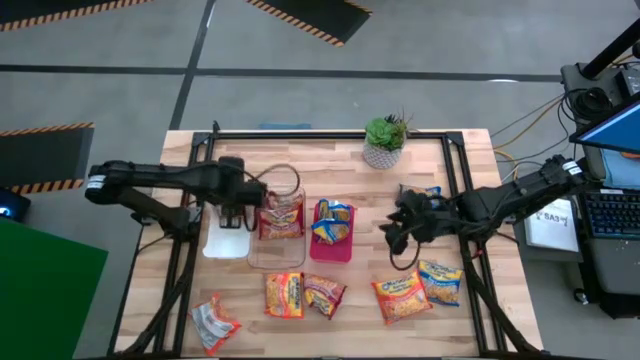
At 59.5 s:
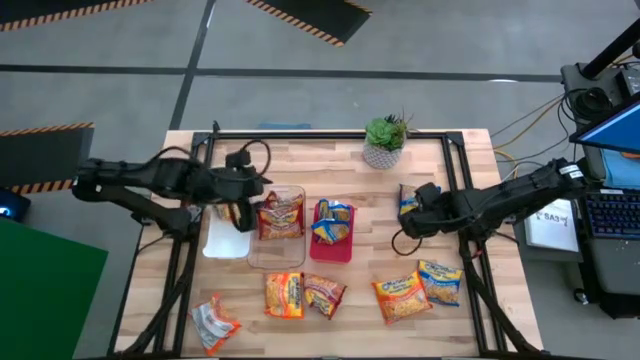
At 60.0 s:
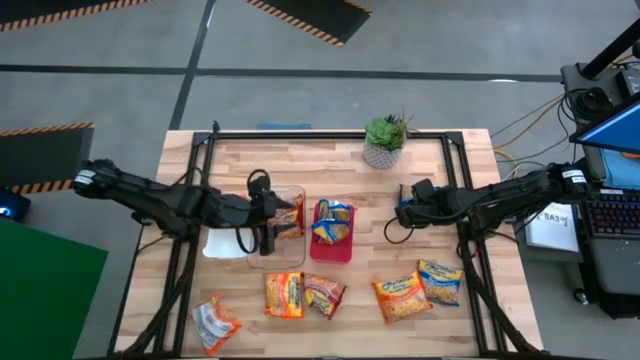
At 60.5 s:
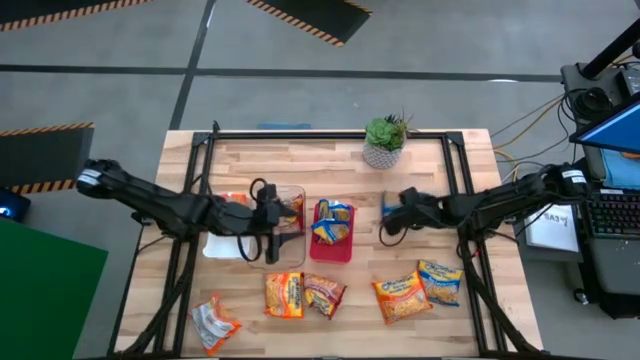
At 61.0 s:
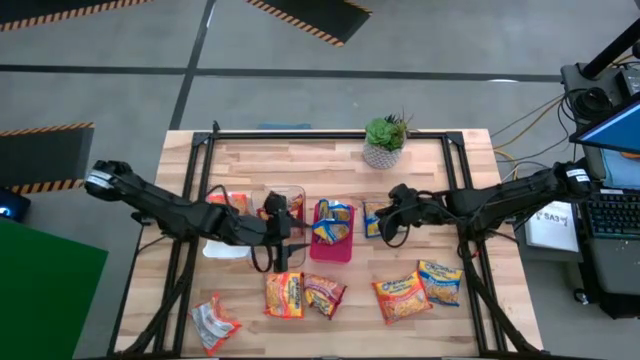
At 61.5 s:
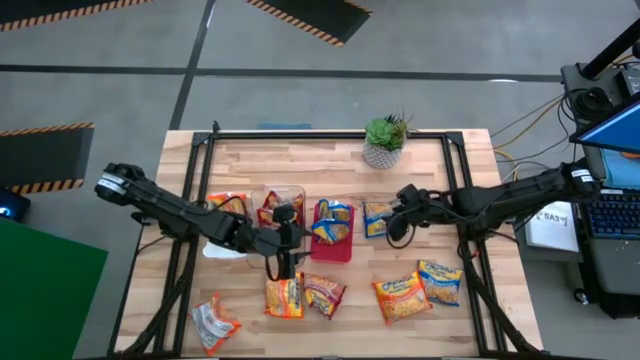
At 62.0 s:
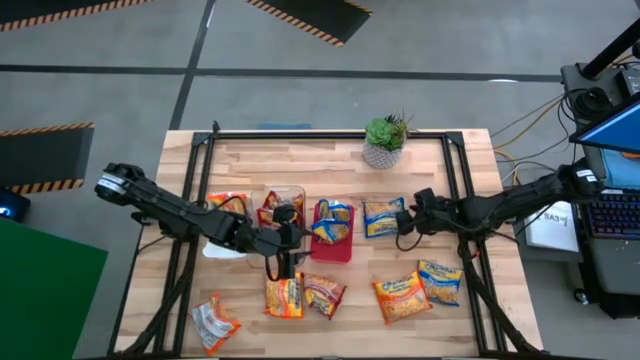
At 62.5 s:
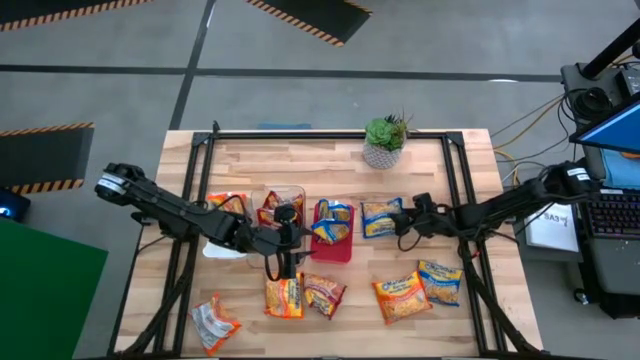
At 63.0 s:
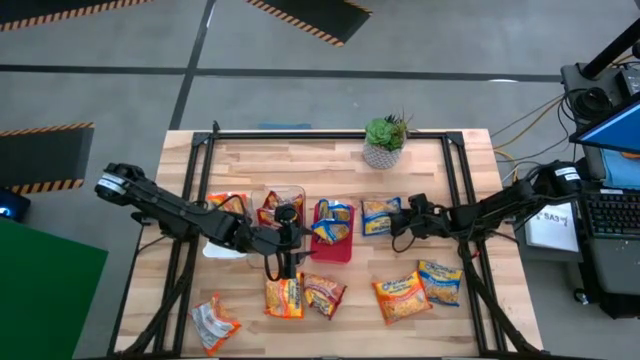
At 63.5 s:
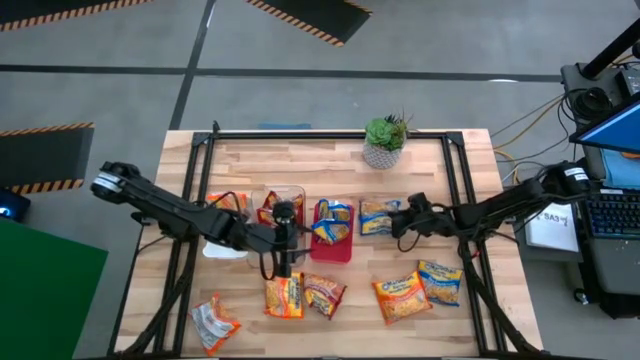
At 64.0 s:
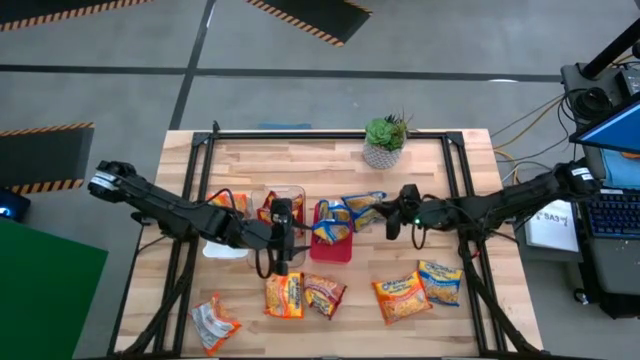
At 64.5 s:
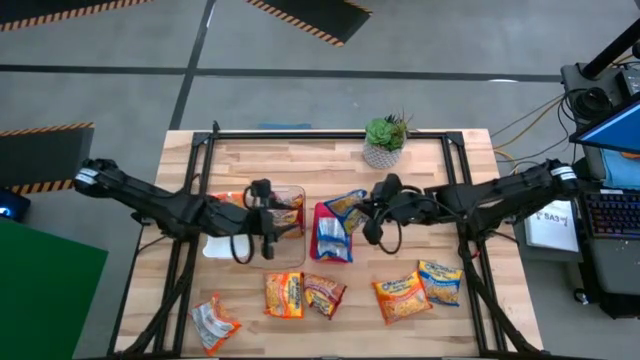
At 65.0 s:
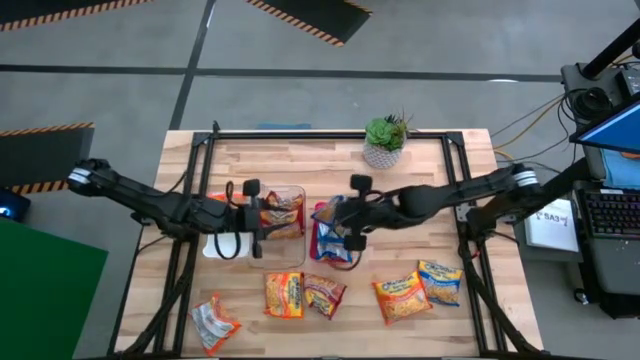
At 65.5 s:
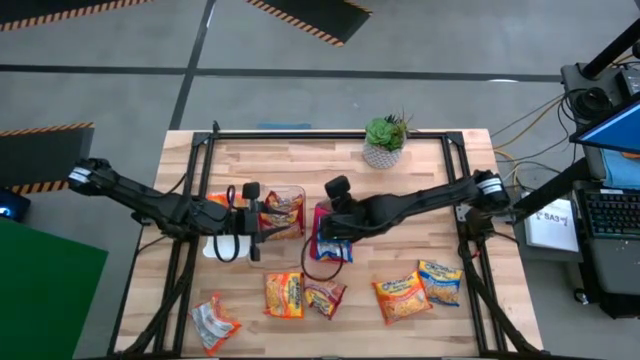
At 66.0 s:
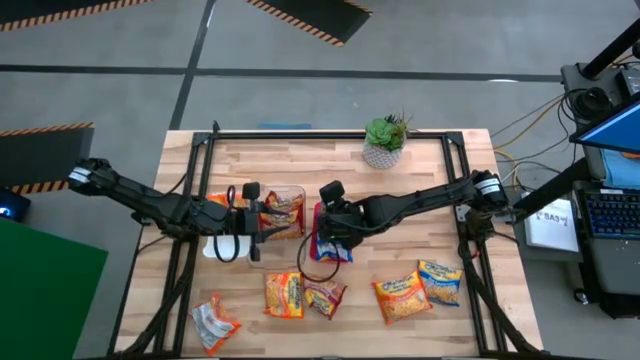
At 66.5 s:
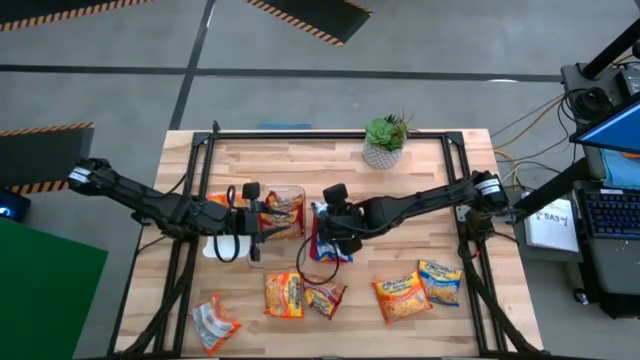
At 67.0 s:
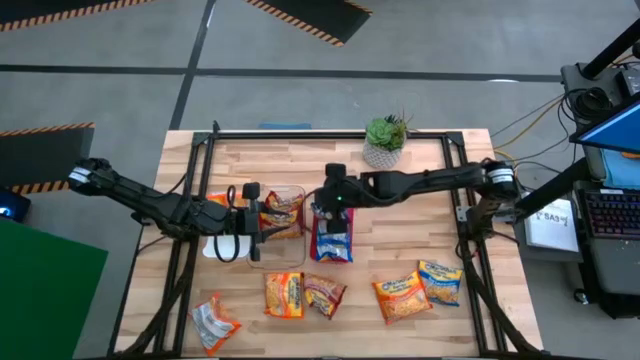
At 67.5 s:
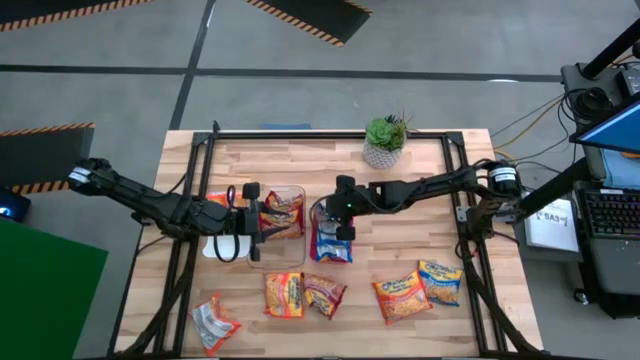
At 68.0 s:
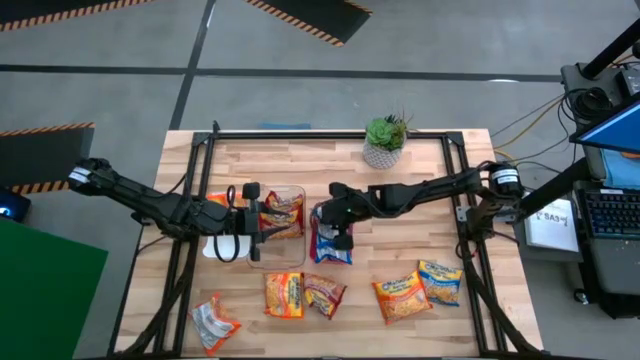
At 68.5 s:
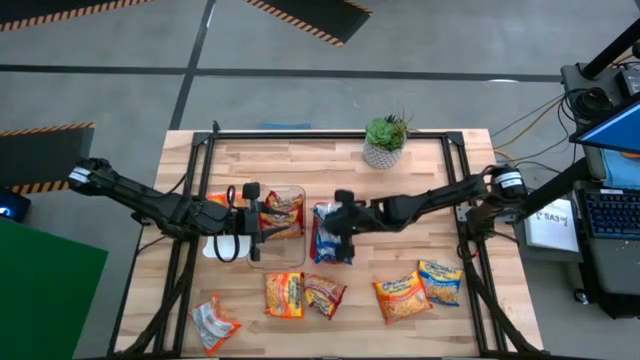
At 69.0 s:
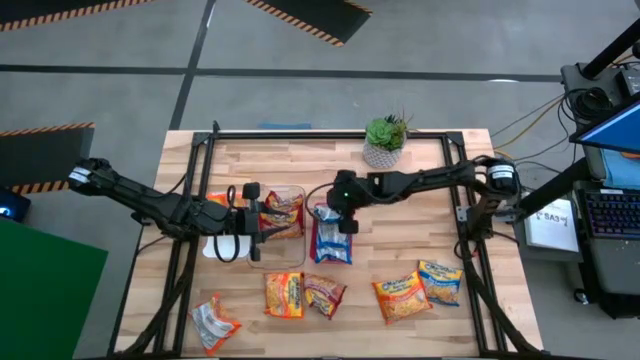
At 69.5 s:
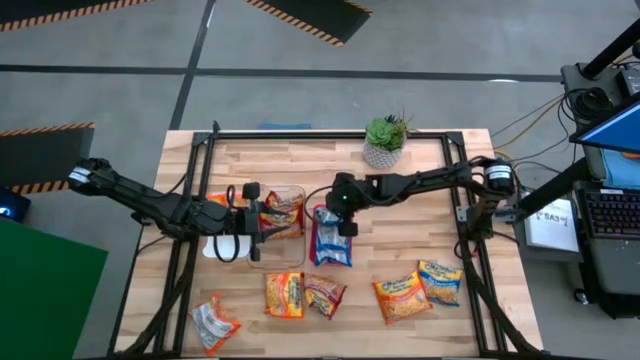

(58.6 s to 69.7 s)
Task: Sort Maruchan noodles
Put the blue noodle pack into the red bin

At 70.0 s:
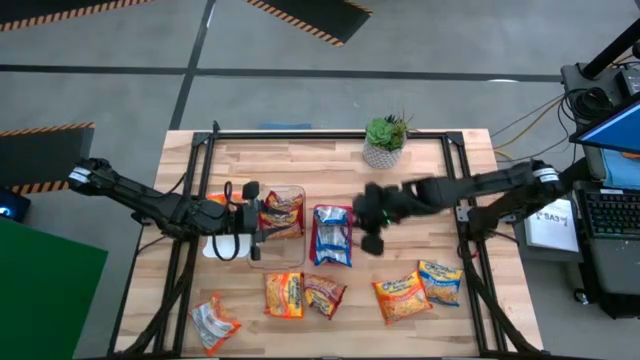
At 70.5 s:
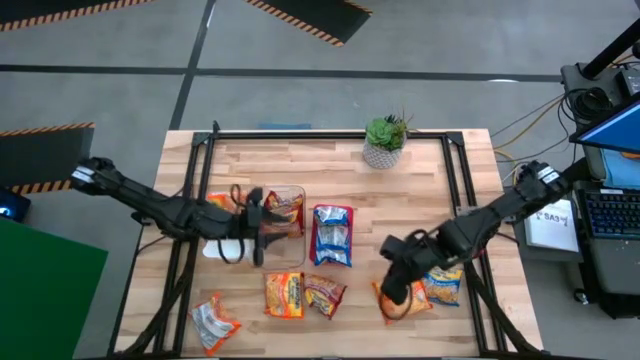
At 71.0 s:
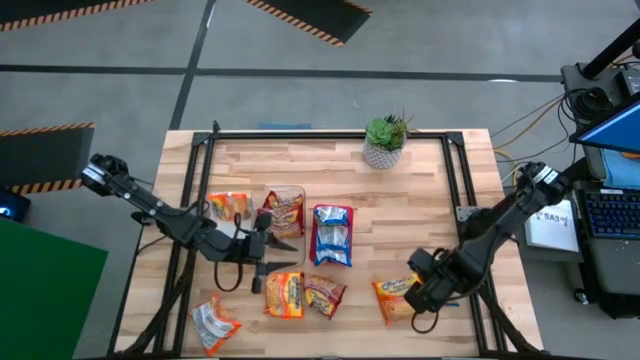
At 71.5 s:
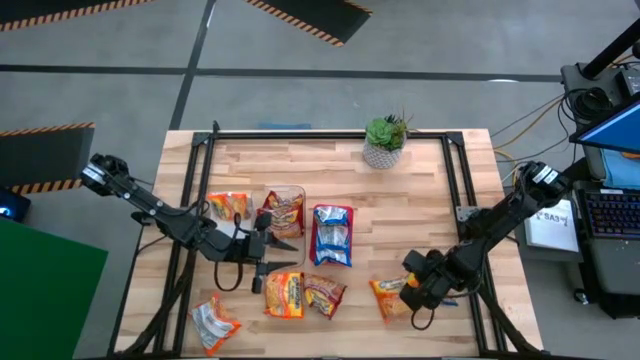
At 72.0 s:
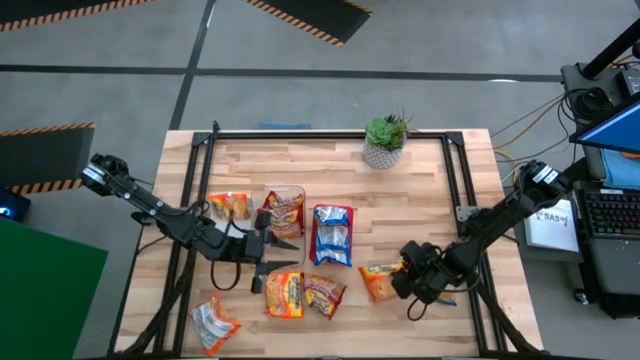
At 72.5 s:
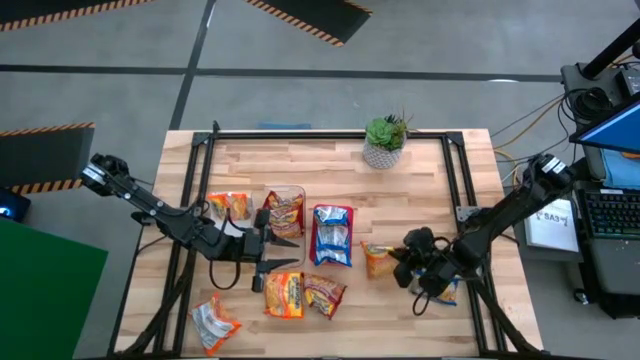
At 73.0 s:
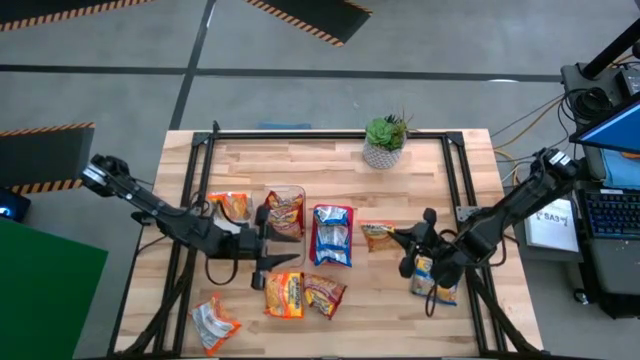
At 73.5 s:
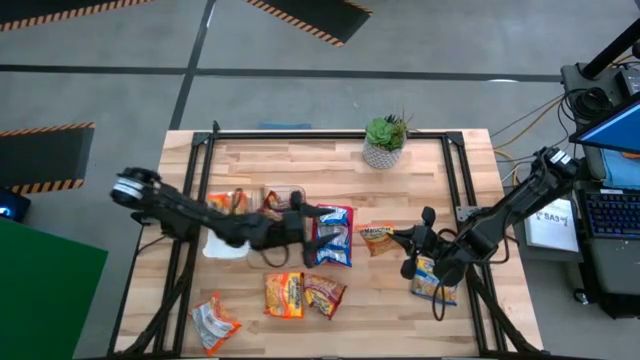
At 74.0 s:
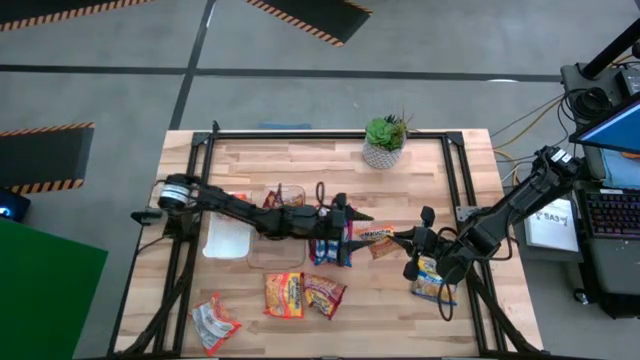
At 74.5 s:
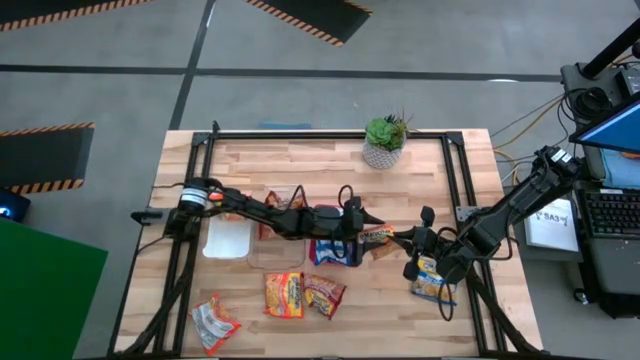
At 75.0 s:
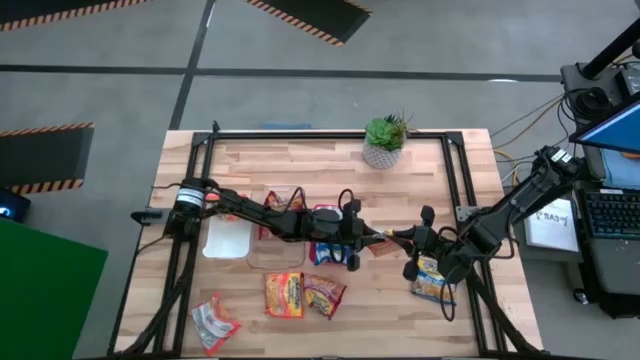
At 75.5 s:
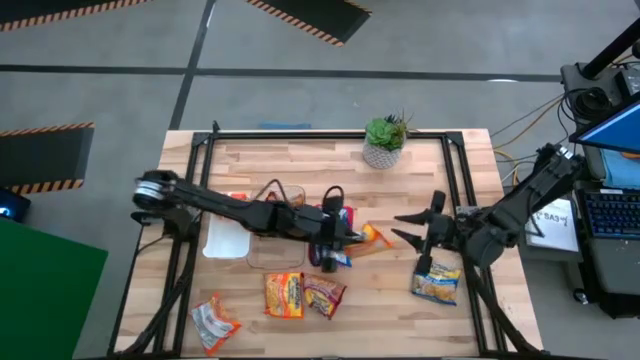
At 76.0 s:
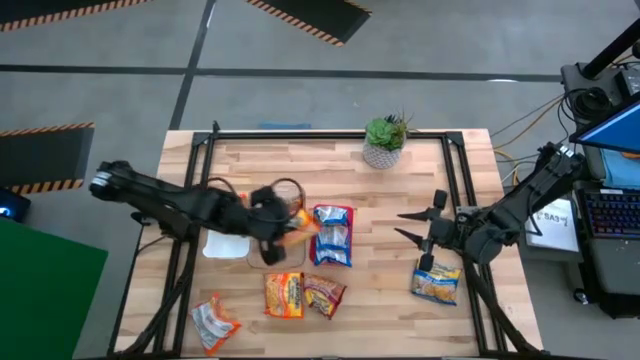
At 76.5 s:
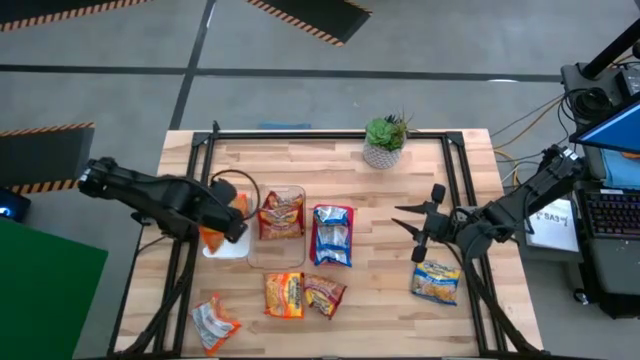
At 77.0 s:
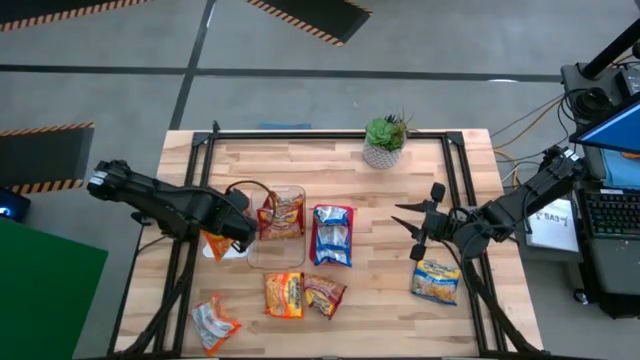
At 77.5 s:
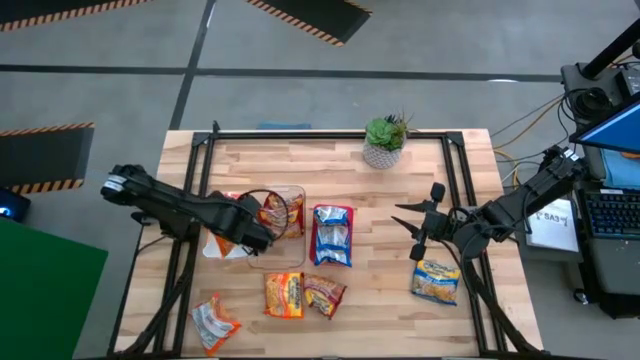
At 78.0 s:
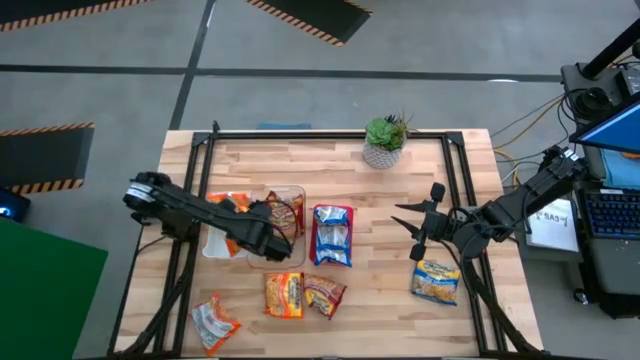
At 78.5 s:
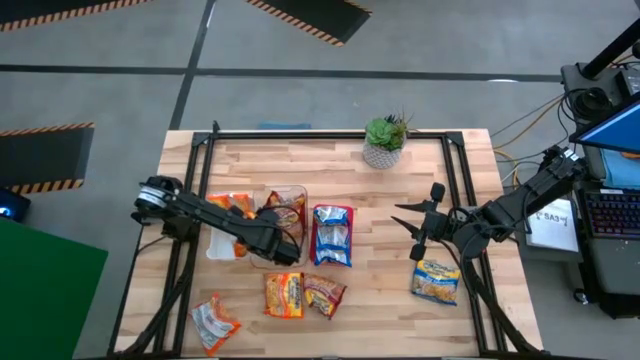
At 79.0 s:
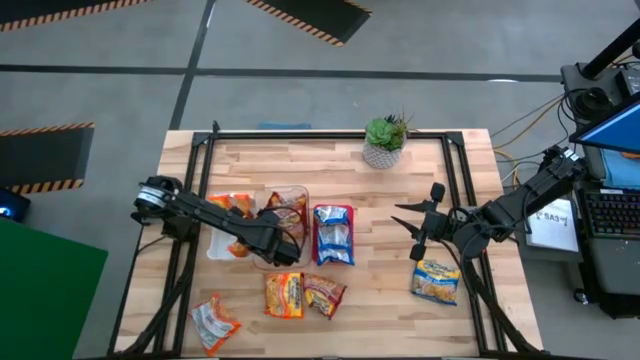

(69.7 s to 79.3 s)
Put the orange noodle pack into the white bin

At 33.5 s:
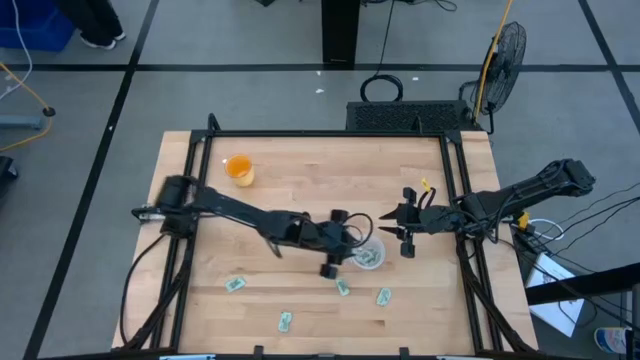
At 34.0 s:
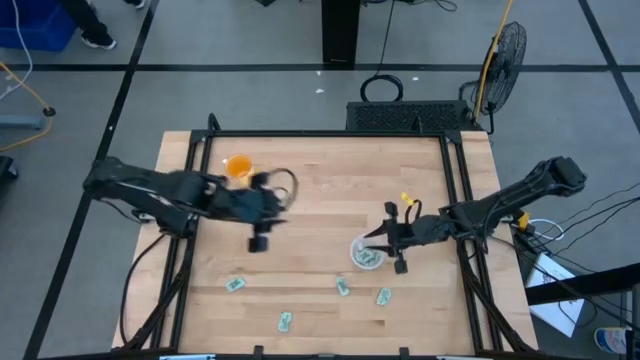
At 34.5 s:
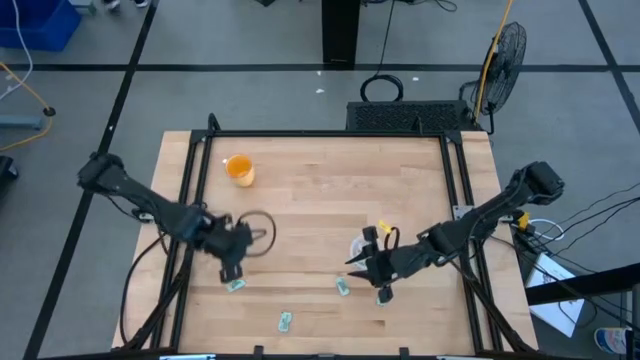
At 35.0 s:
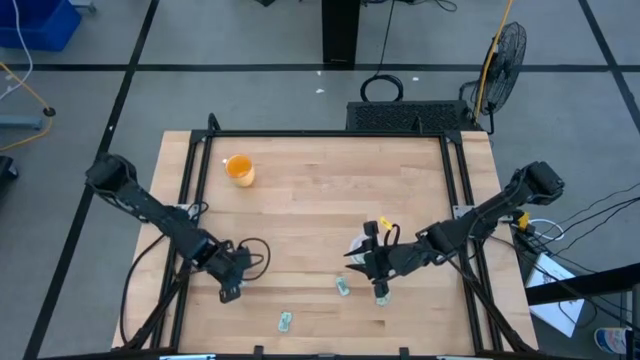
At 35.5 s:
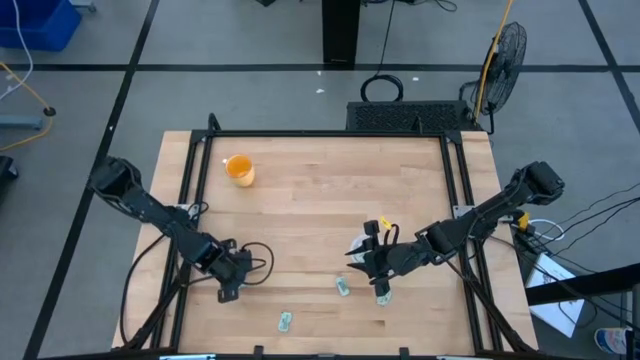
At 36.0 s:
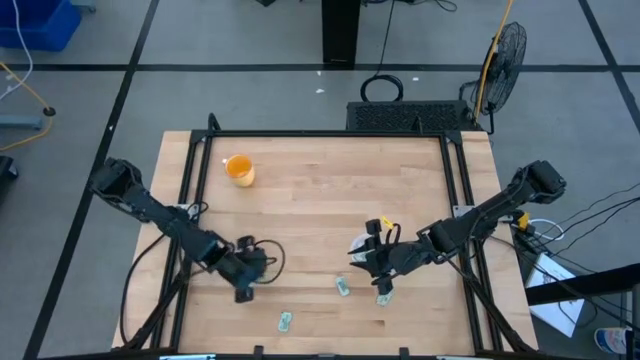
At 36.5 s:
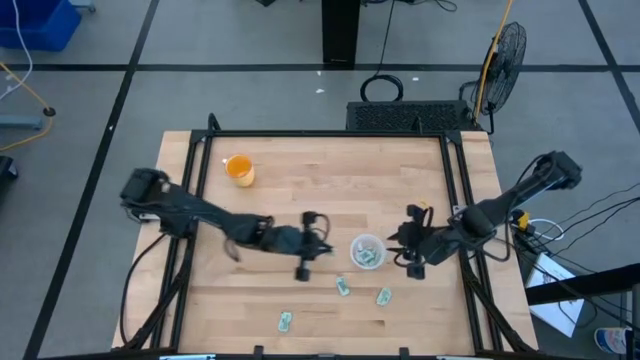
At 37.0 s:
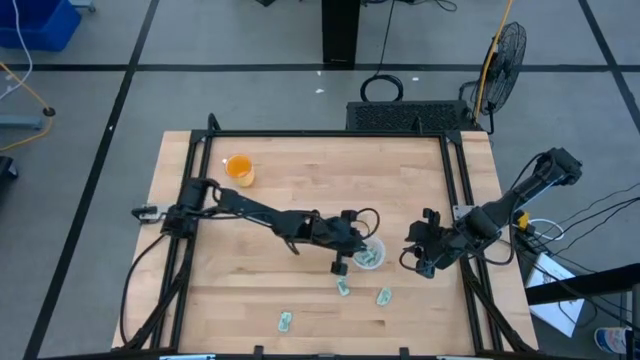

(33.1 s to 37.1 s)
Task: Pick and place Stevia / Truvia into bins
Put the stevia packet into the transparent container
